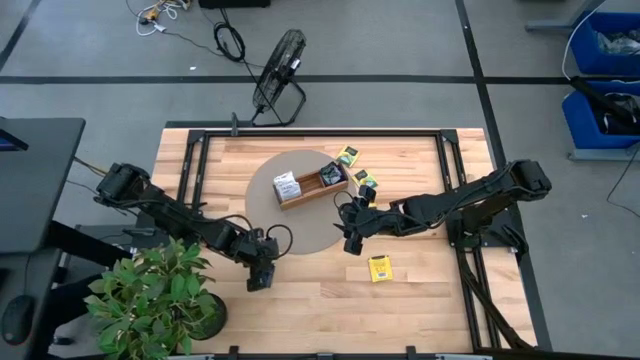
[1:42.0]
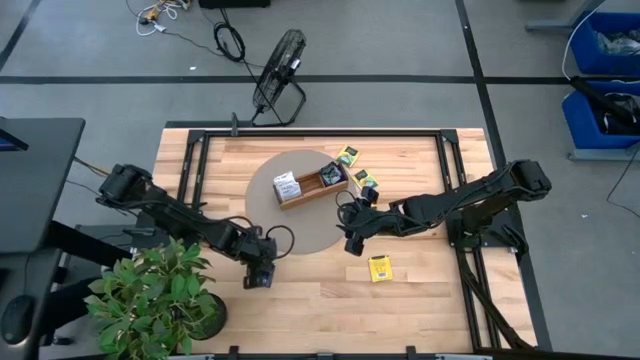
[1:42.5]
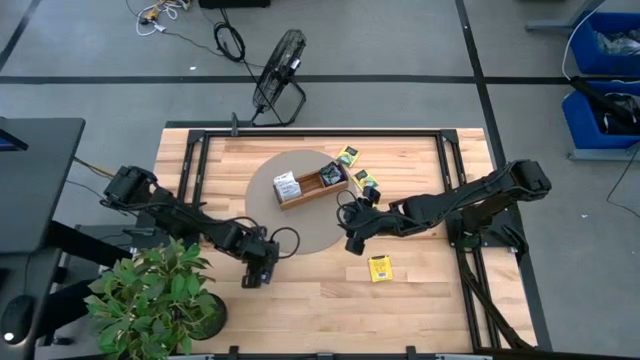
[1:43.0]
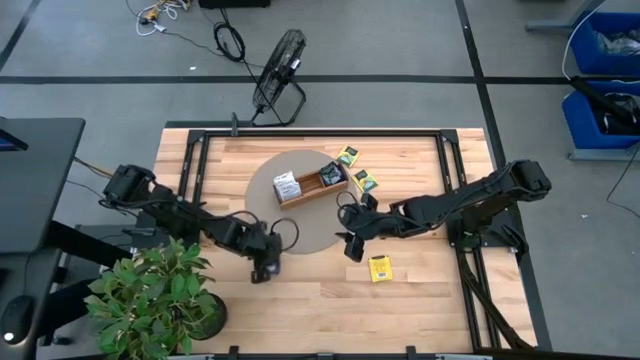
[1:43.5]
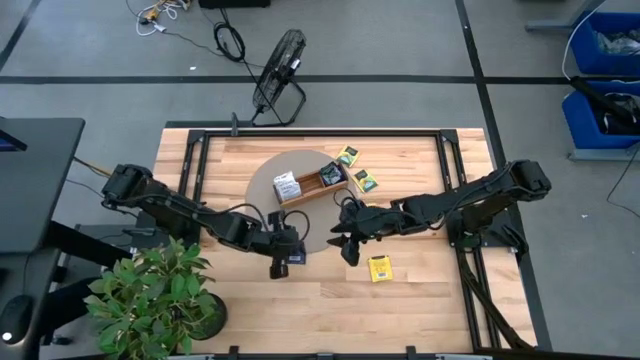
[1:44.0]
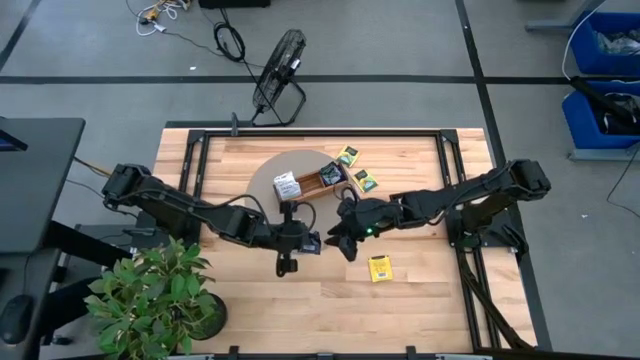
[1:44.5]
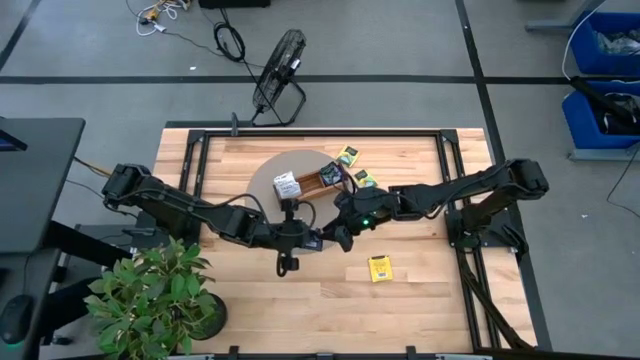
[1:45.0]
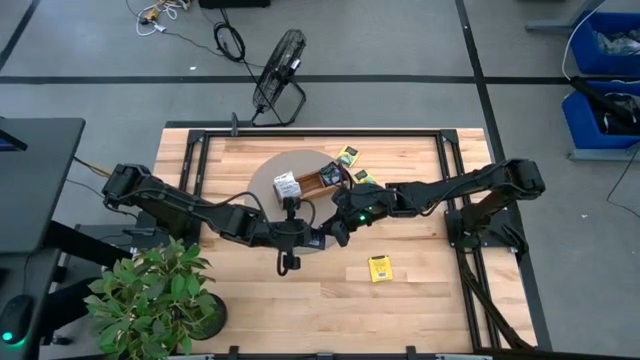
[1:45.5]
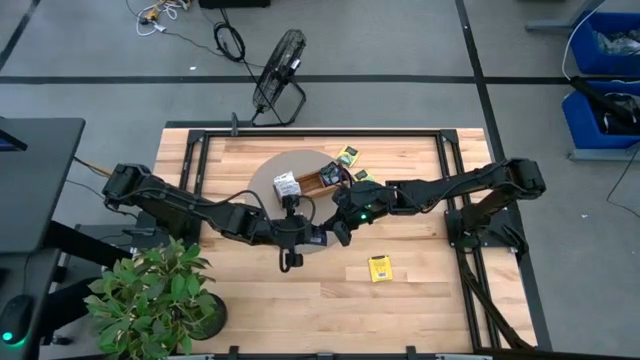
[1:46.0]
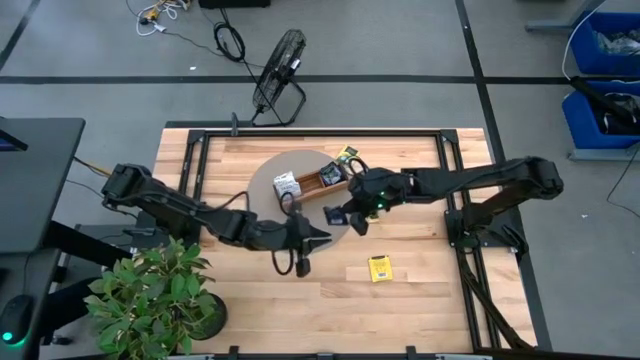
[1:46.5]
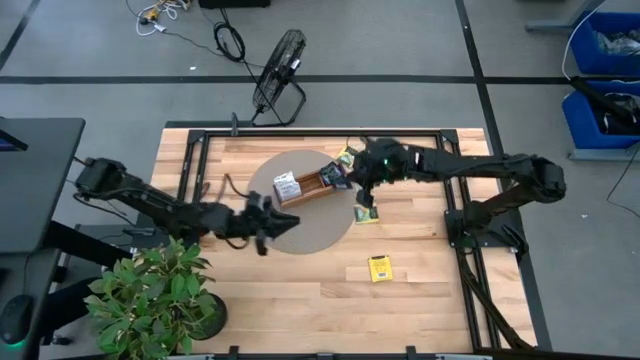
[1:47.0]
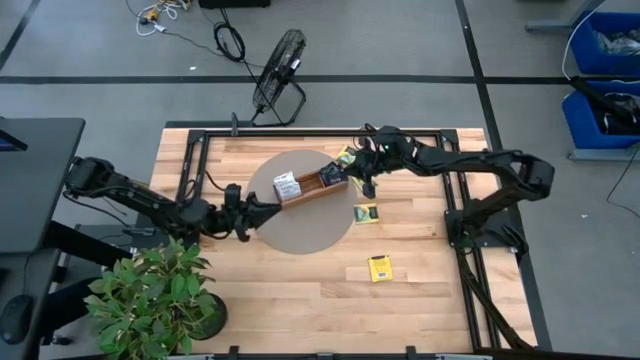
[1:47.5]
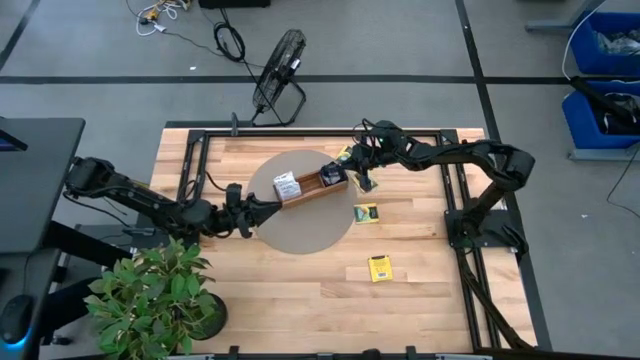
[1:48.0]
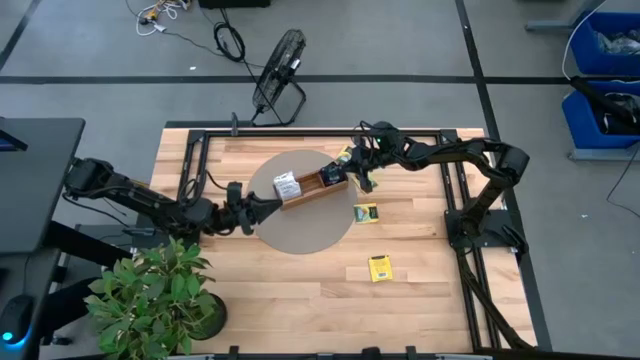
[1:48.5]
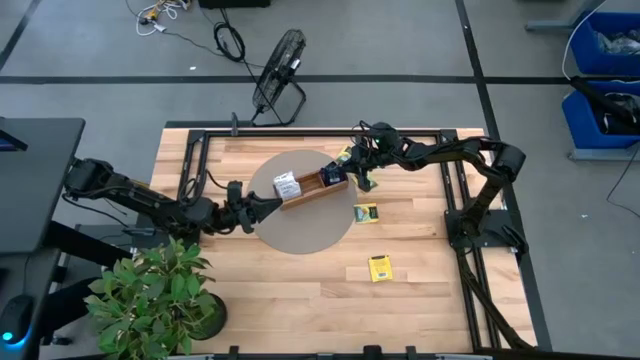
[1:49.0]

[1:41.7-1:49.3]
Task: Pick & Place Tea
Put the purple tea bag into the right section of the wooden organizer

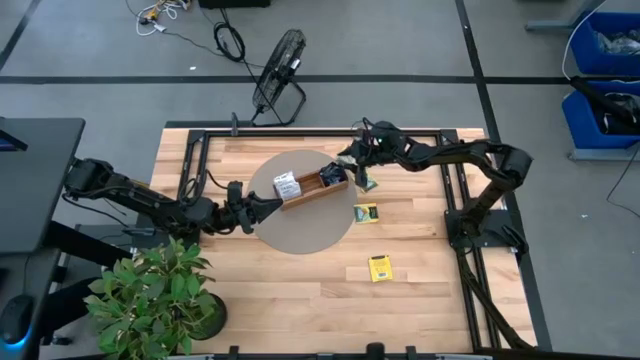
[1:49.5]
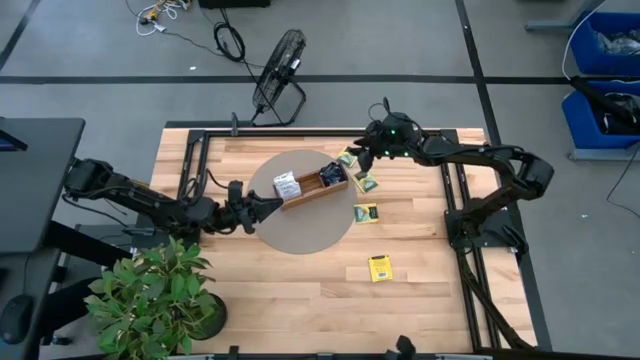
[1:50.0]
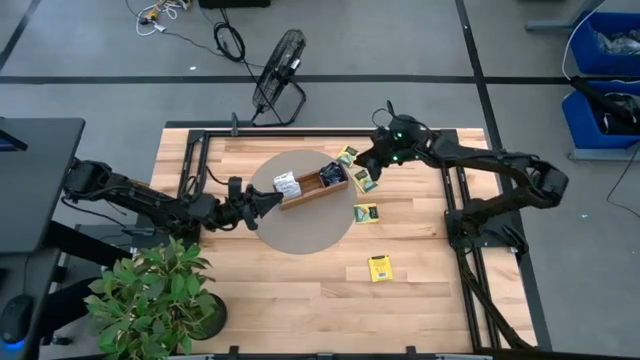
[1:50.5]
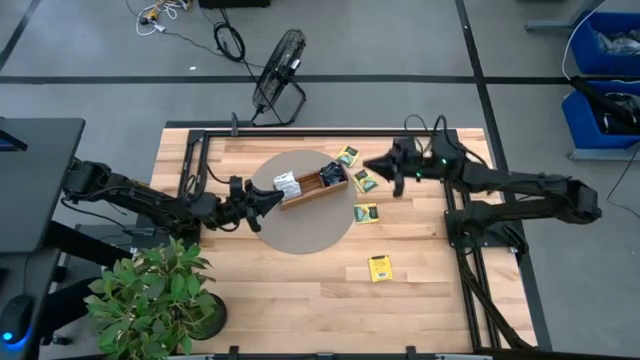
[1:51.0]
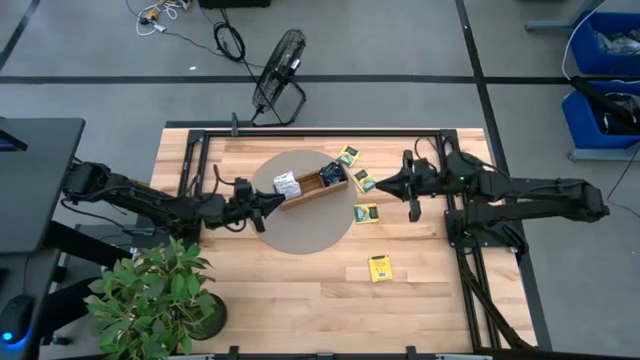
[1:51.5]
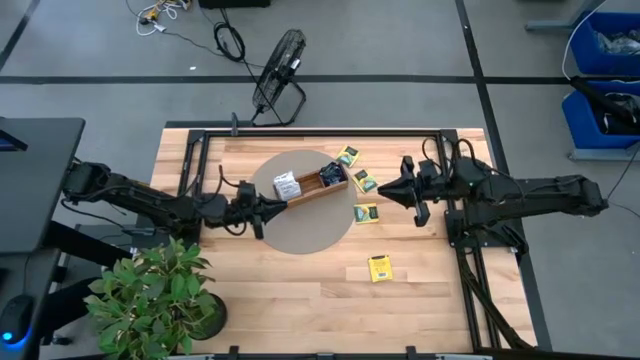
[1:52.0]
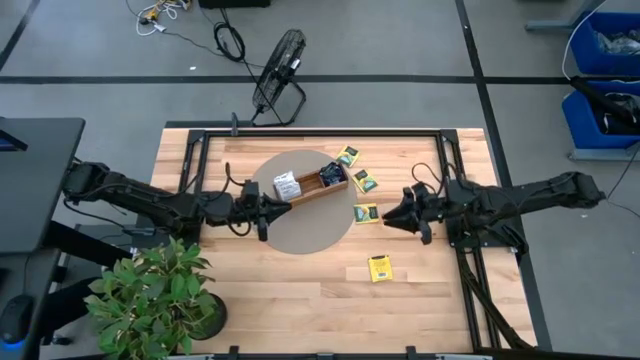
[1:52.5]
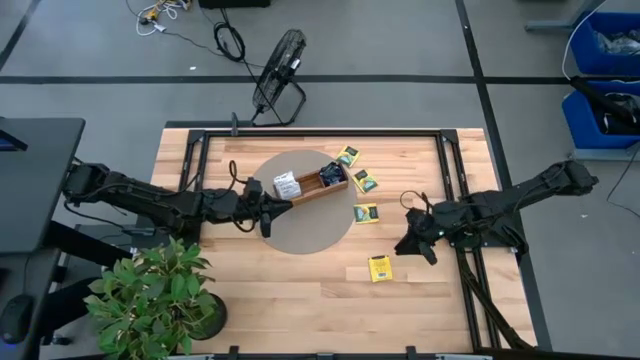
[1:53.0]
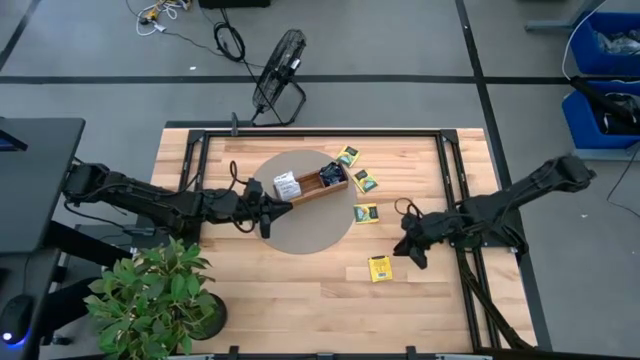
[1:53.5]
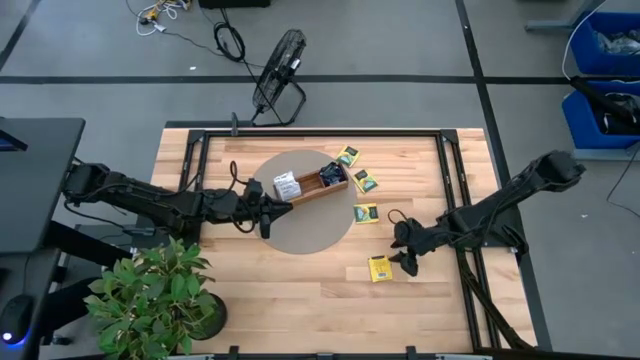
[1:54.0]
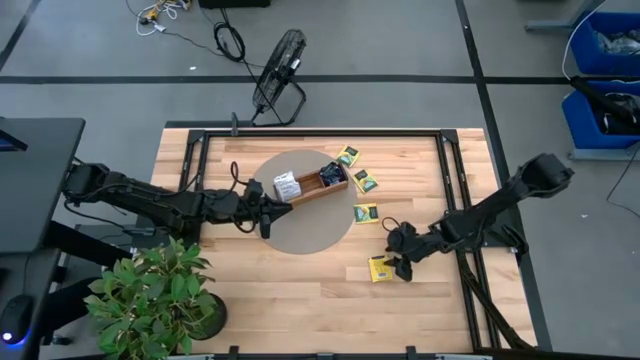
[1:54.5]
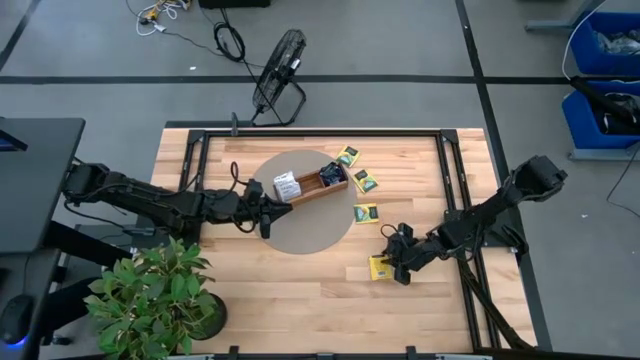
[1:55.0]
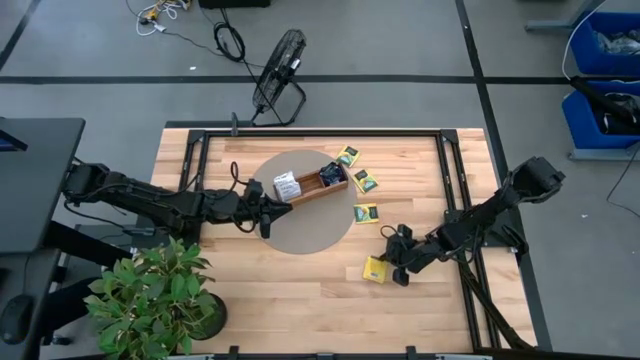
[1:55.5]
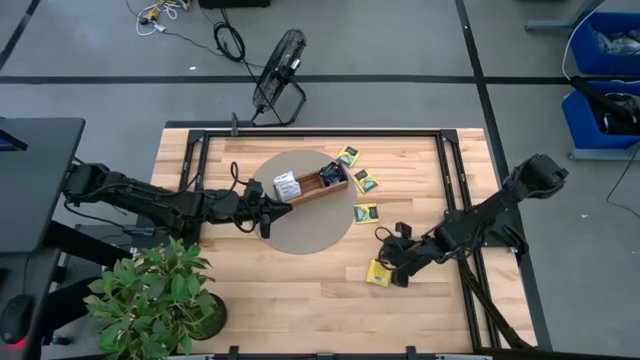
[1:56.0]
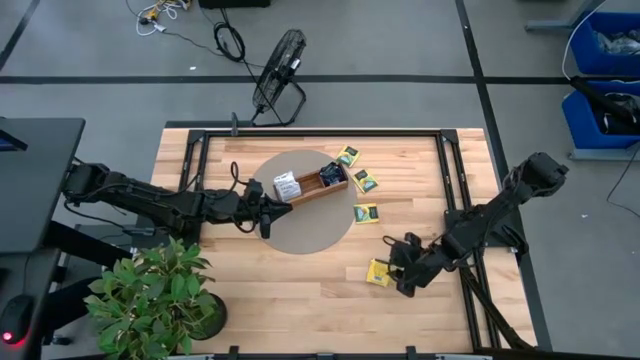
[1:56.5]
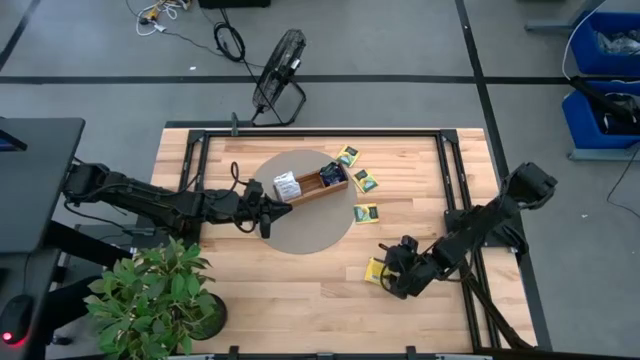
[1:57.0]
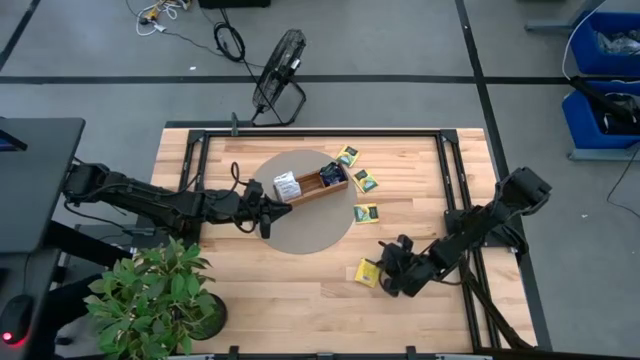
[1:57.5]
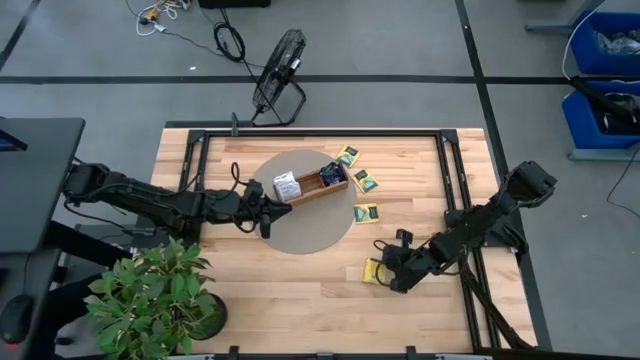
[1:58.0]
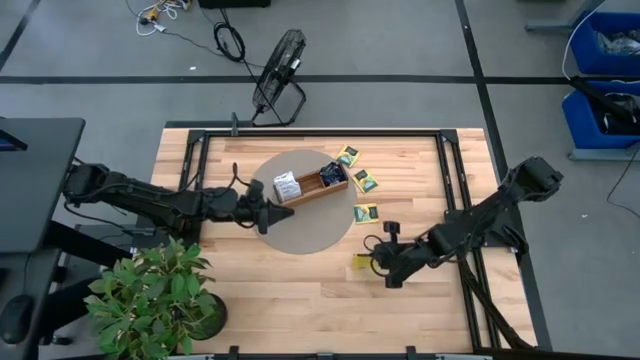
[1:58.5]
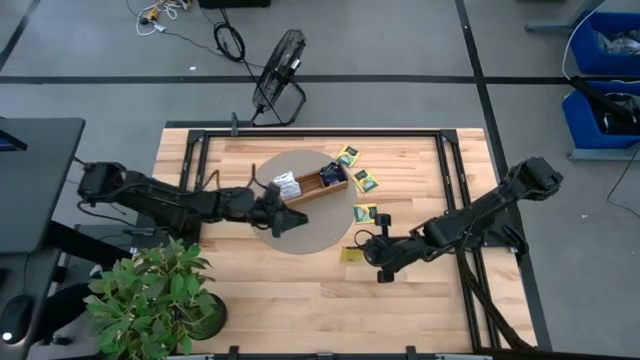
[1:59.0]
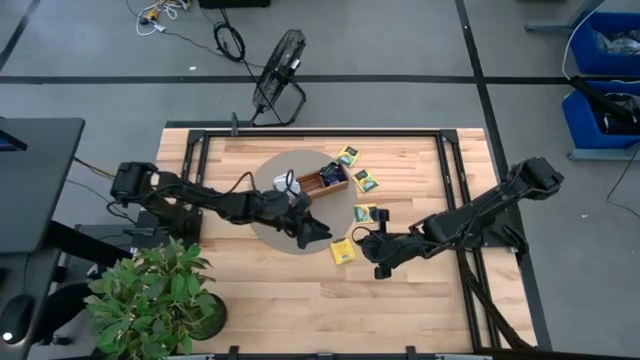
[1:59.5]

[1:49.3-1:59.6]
Put the yellow tea bag into the middle section of the wooden organizer

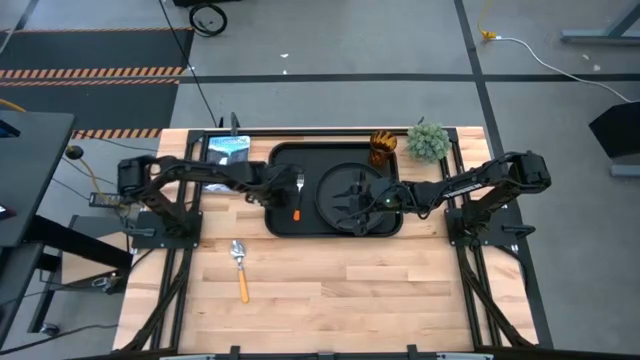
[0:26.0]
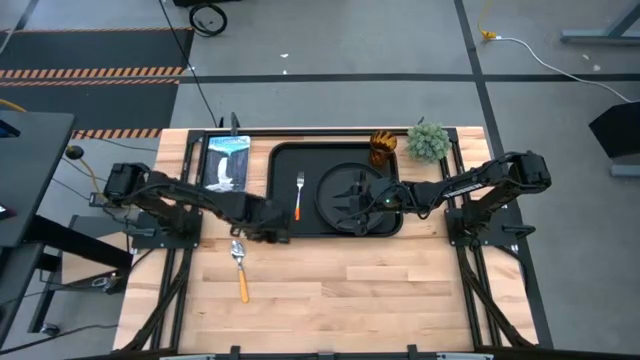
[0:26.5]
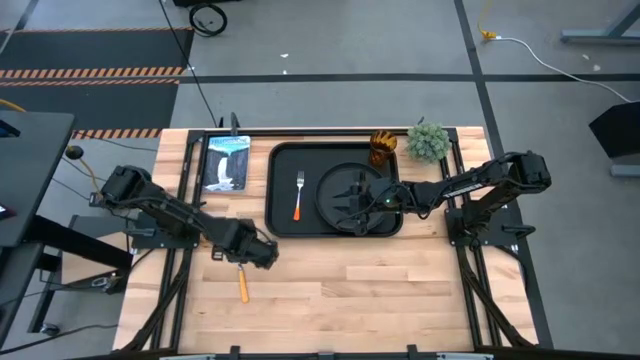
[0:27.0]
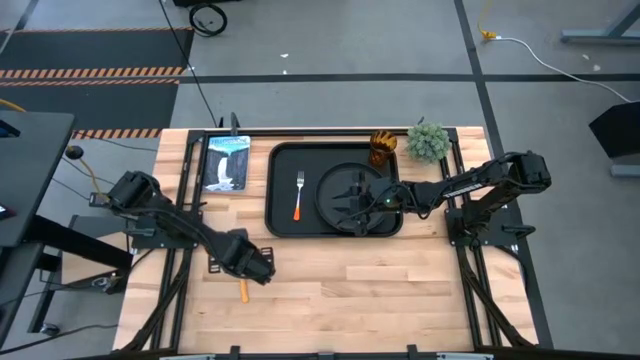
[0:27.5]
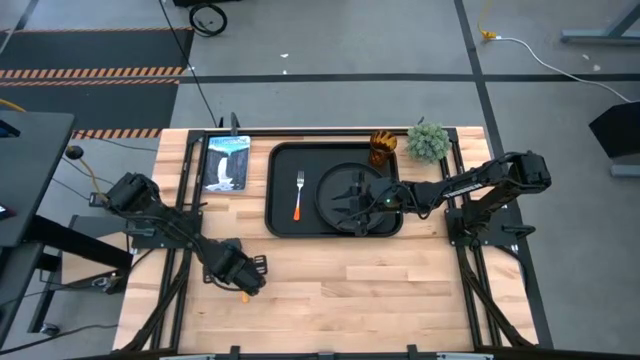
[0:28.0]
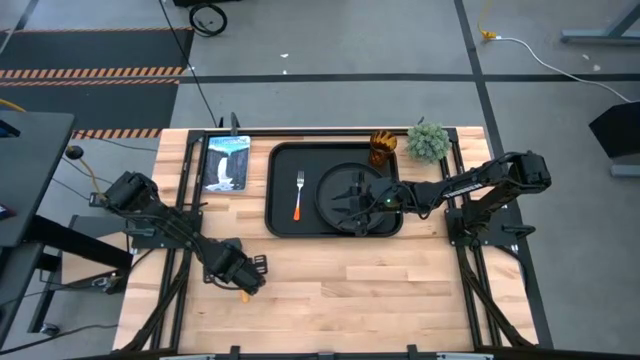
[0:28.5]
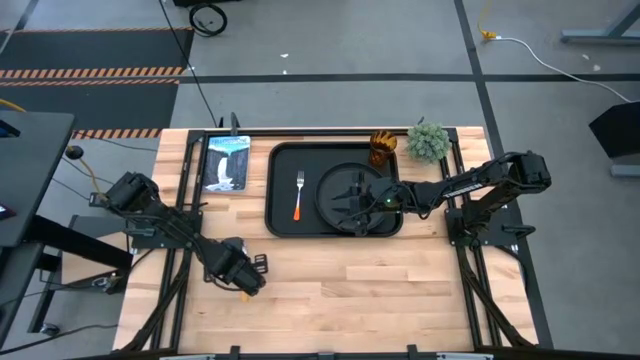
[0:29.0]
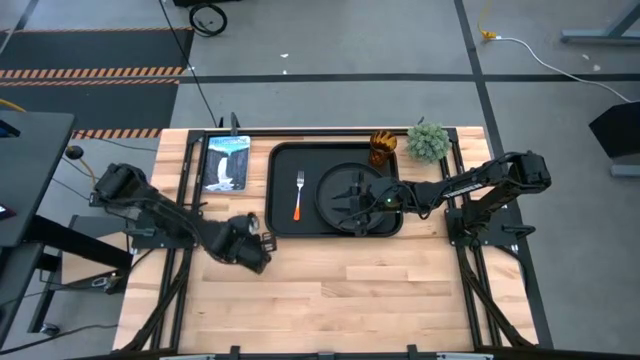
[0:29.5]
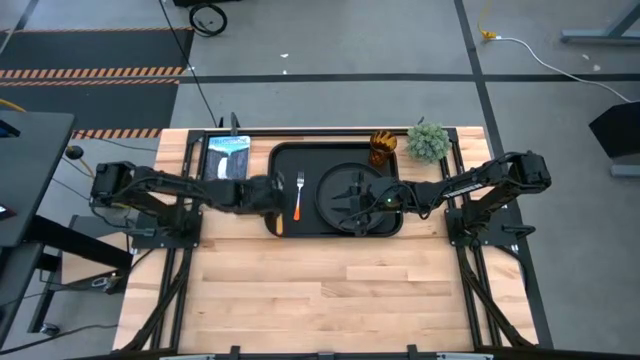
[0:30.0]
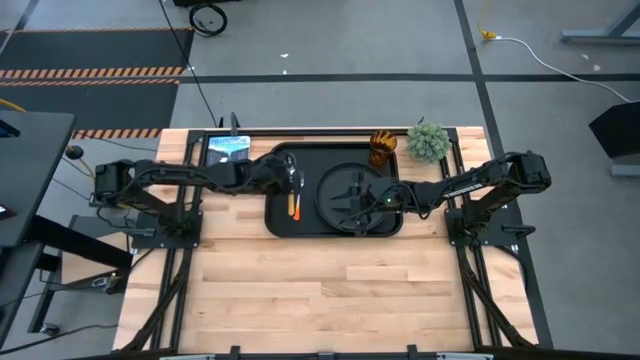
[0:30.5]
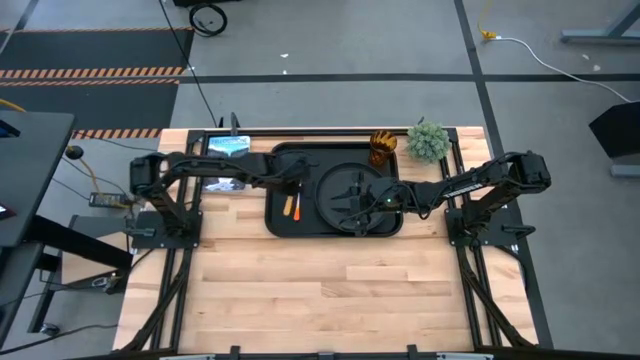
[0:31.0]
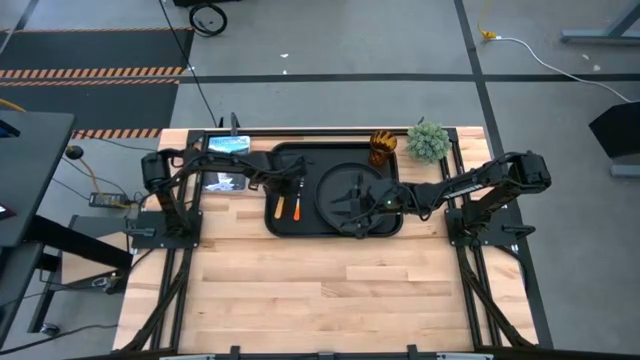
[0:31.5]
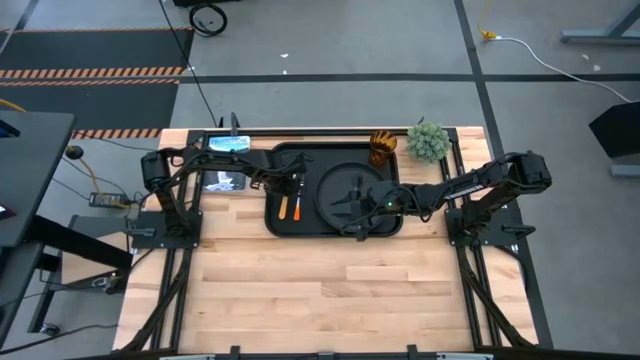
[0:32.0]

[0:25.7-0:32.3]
Task: Pick and place plate/cup/fork/spoon on tray
Put the yellow spoon to the left of the orange fork on the black tray
